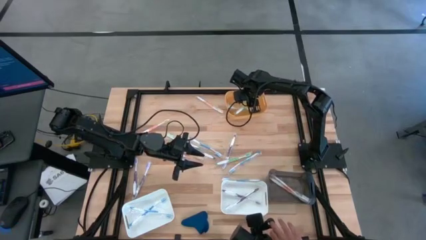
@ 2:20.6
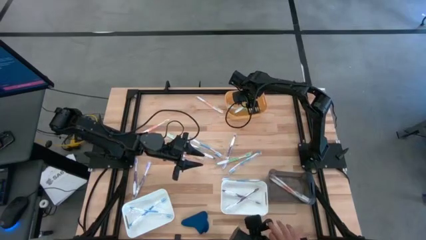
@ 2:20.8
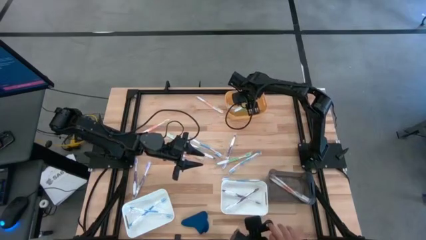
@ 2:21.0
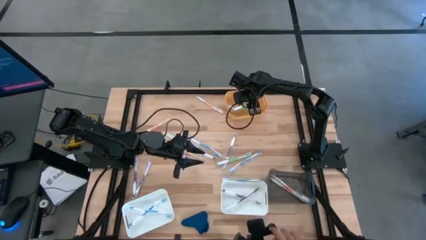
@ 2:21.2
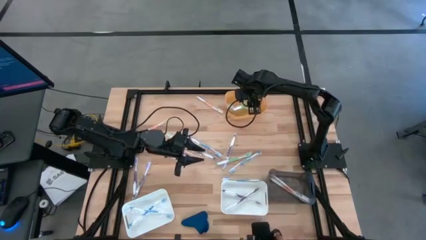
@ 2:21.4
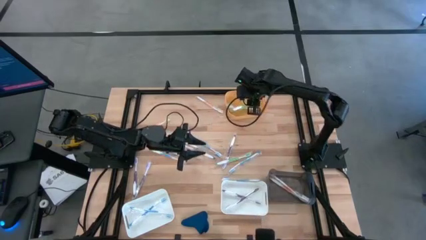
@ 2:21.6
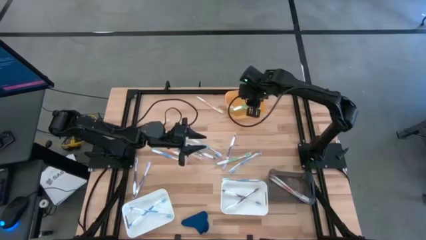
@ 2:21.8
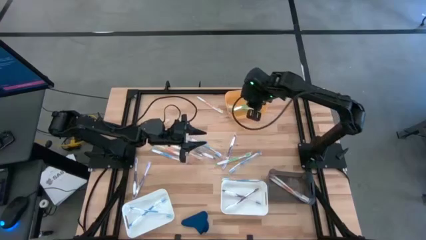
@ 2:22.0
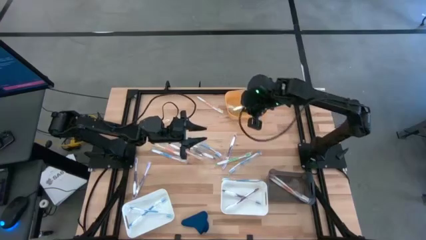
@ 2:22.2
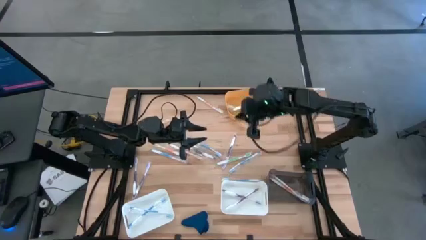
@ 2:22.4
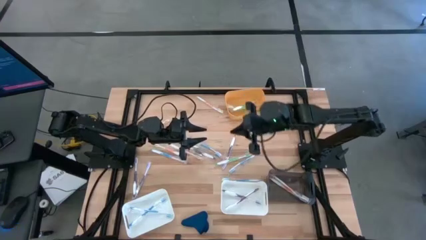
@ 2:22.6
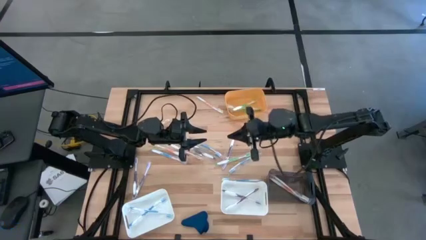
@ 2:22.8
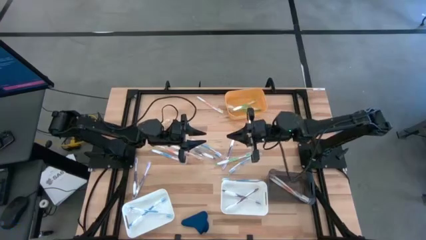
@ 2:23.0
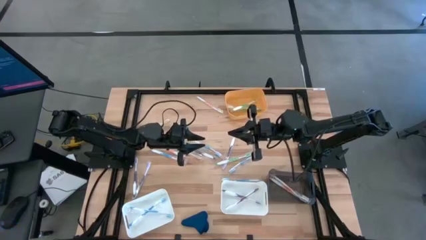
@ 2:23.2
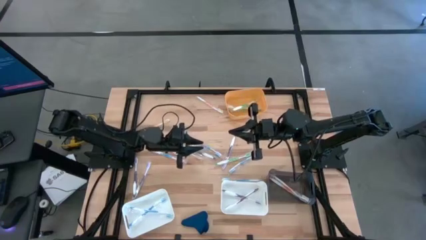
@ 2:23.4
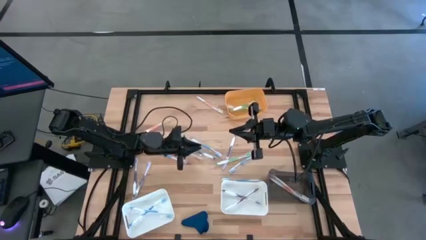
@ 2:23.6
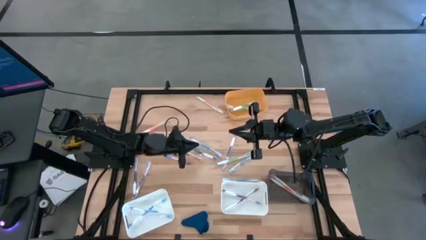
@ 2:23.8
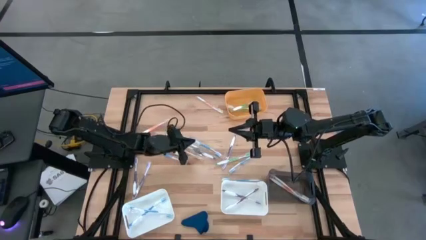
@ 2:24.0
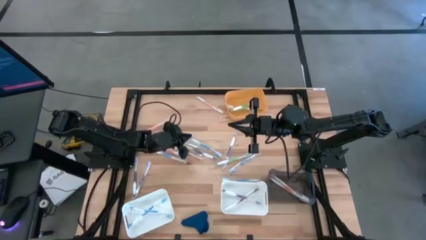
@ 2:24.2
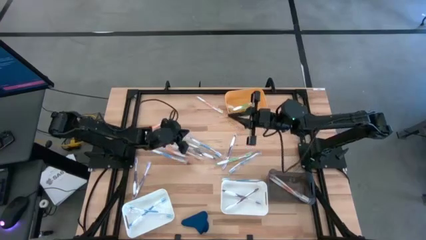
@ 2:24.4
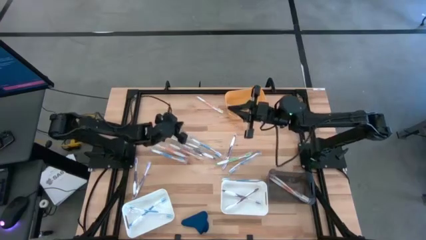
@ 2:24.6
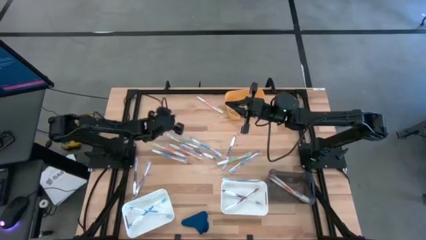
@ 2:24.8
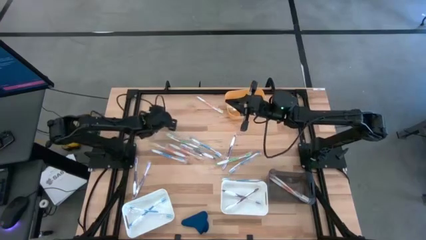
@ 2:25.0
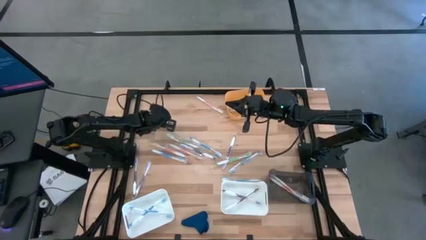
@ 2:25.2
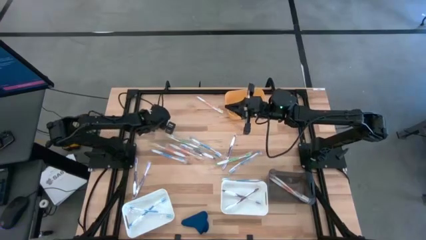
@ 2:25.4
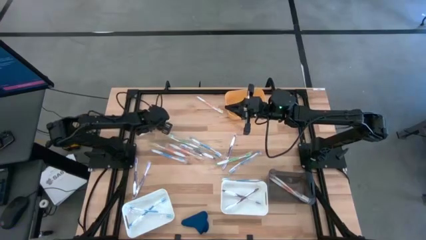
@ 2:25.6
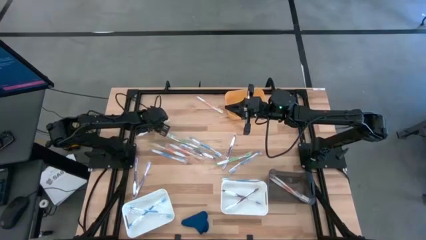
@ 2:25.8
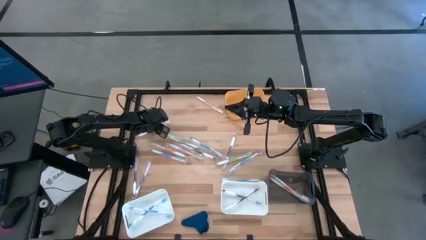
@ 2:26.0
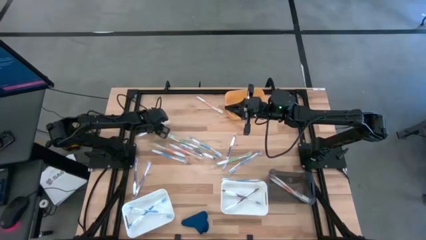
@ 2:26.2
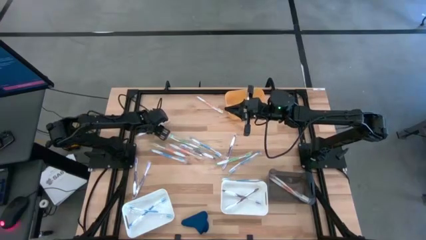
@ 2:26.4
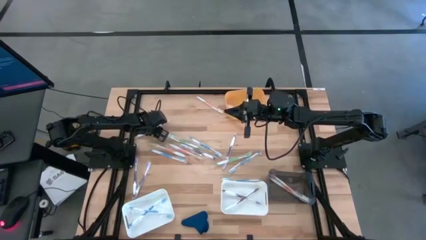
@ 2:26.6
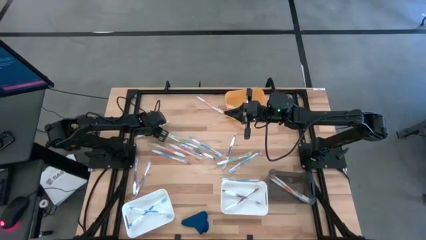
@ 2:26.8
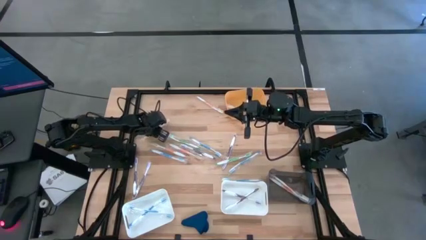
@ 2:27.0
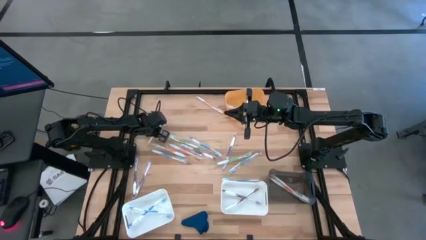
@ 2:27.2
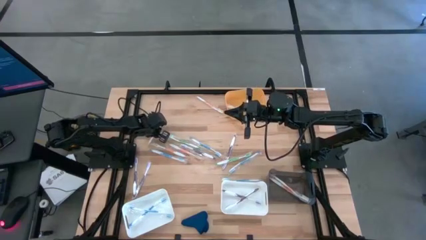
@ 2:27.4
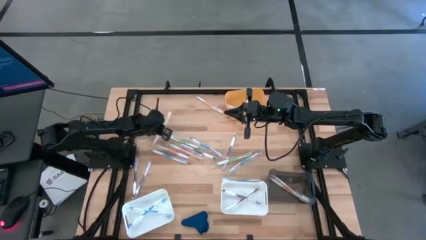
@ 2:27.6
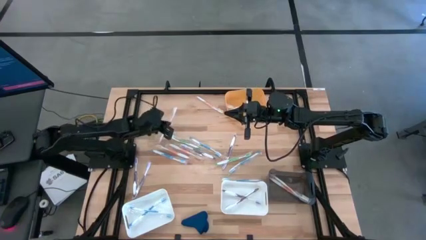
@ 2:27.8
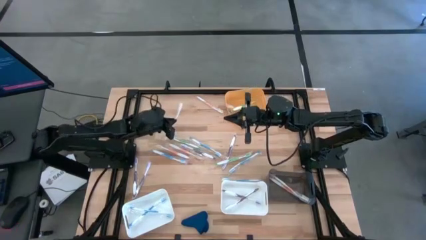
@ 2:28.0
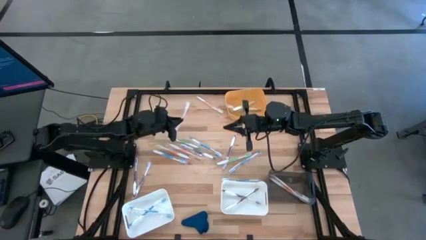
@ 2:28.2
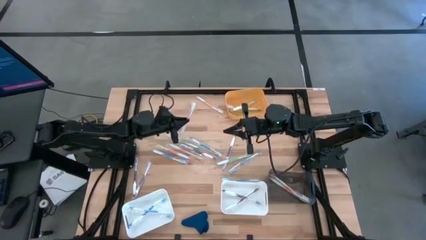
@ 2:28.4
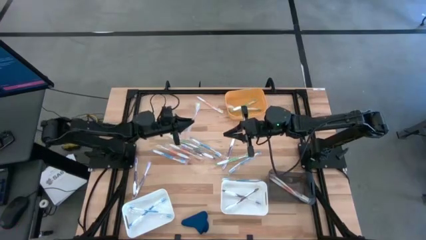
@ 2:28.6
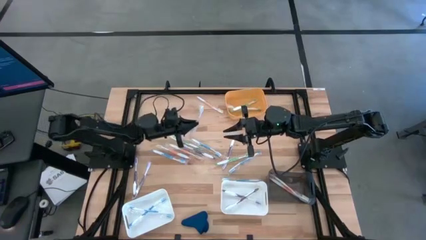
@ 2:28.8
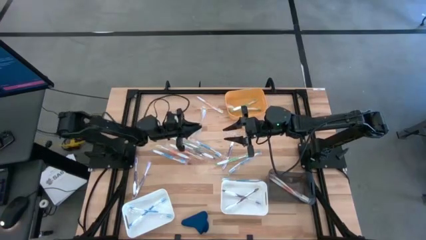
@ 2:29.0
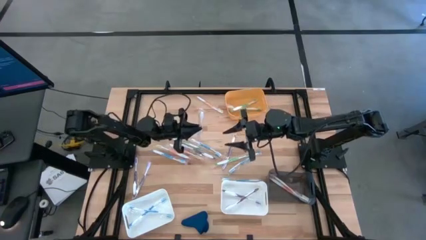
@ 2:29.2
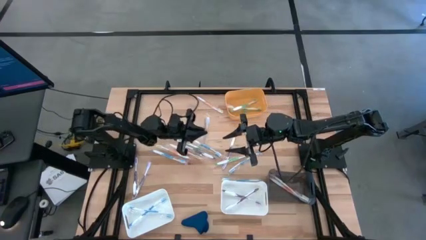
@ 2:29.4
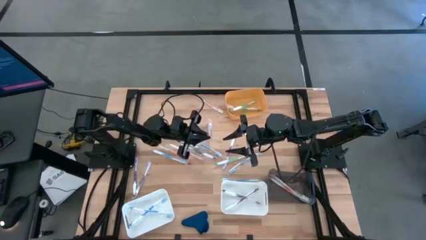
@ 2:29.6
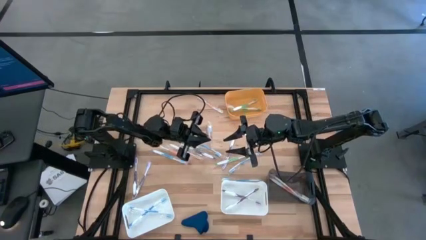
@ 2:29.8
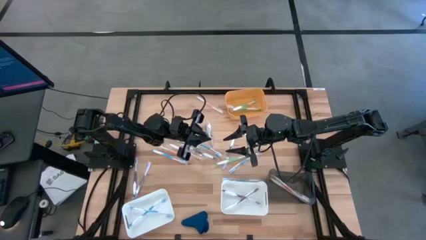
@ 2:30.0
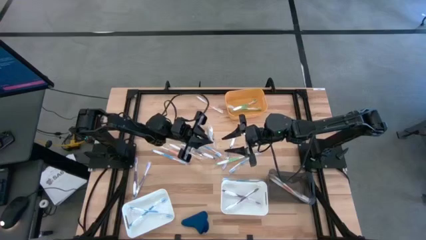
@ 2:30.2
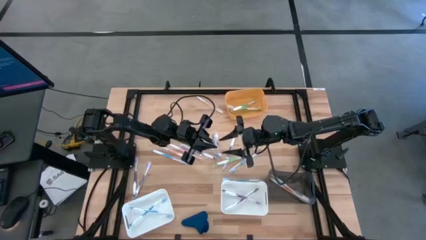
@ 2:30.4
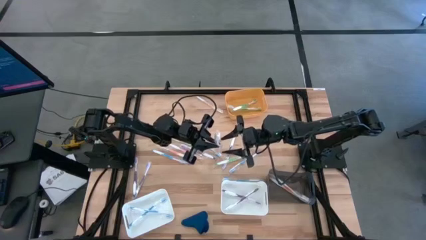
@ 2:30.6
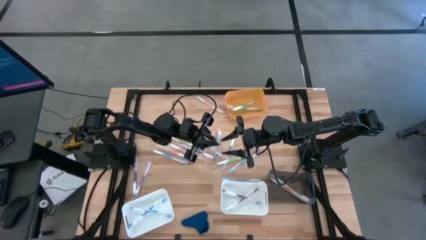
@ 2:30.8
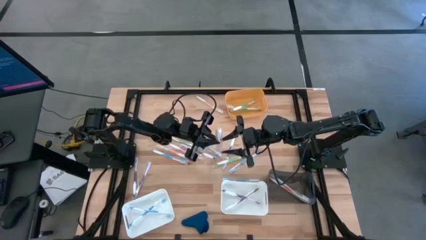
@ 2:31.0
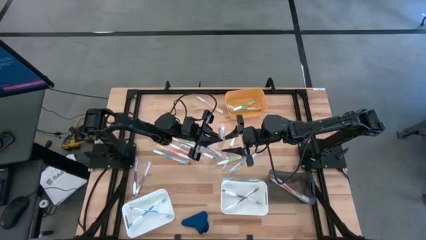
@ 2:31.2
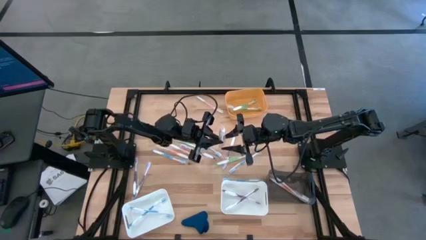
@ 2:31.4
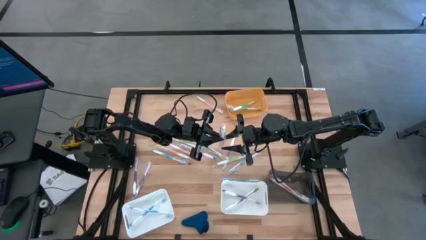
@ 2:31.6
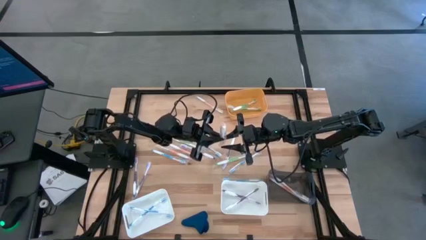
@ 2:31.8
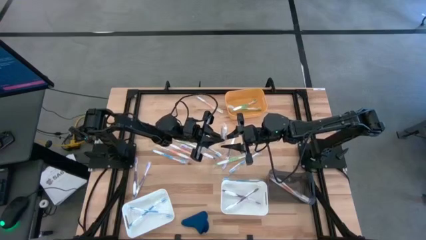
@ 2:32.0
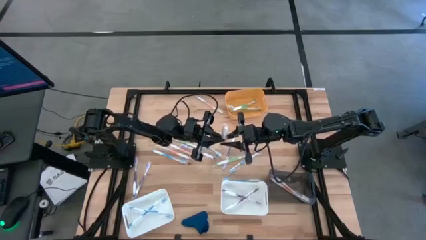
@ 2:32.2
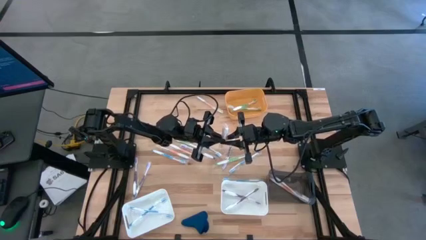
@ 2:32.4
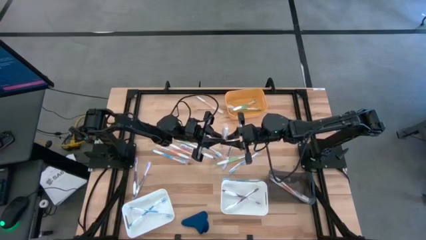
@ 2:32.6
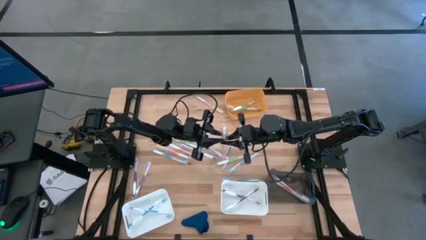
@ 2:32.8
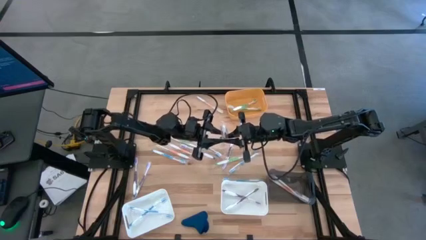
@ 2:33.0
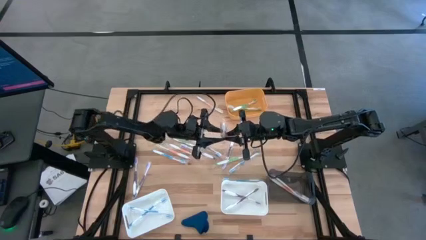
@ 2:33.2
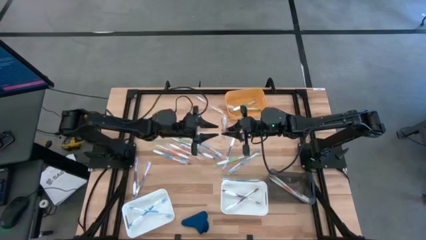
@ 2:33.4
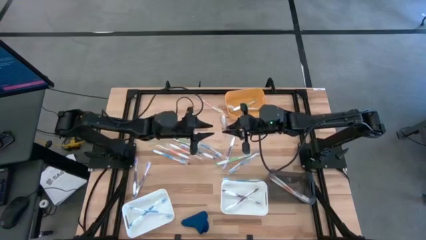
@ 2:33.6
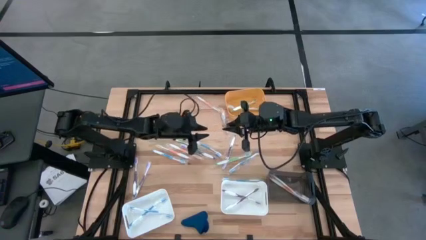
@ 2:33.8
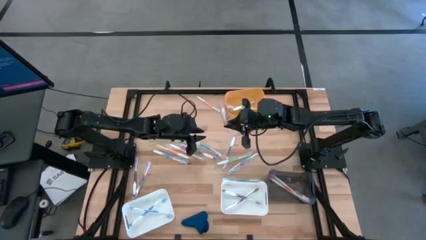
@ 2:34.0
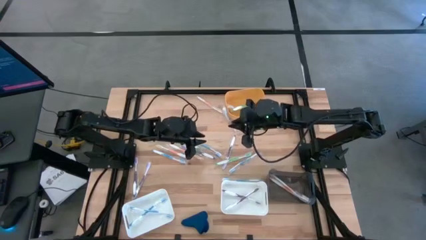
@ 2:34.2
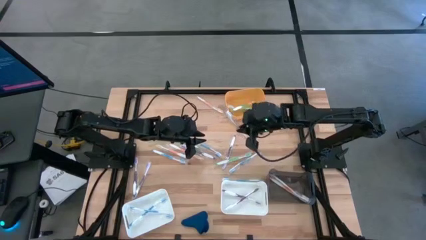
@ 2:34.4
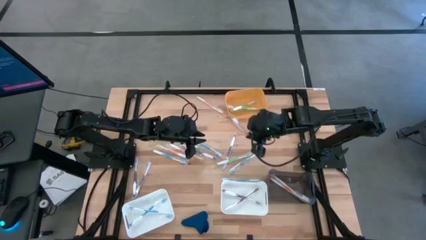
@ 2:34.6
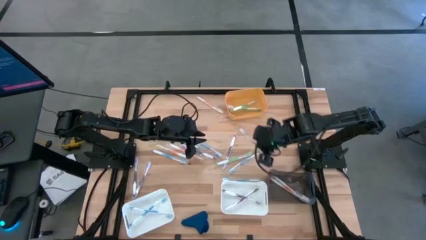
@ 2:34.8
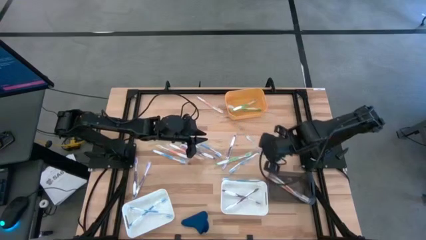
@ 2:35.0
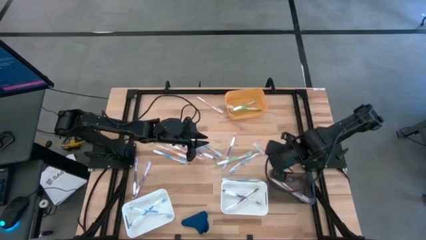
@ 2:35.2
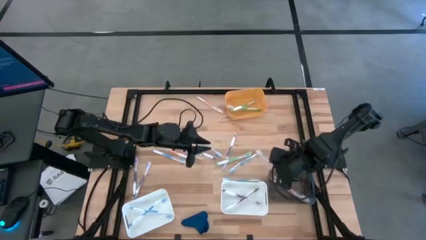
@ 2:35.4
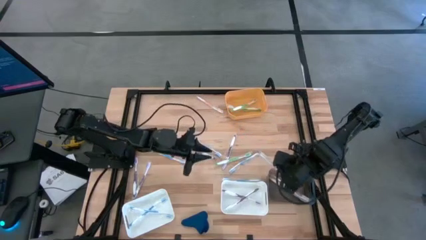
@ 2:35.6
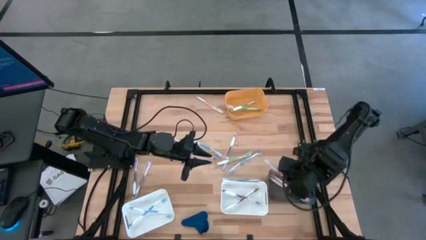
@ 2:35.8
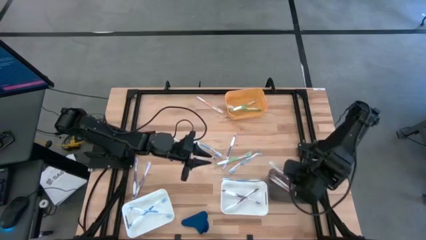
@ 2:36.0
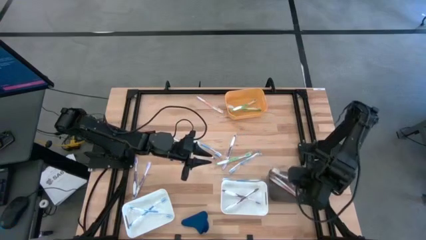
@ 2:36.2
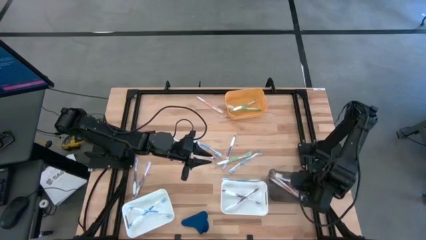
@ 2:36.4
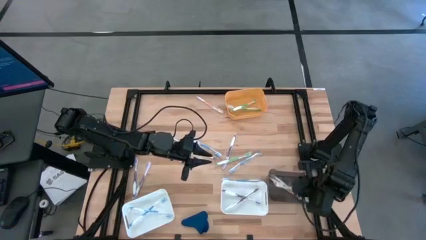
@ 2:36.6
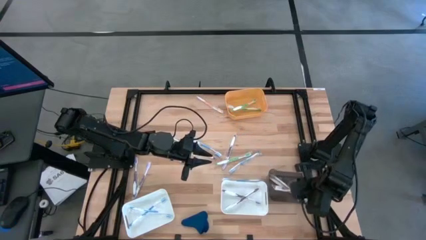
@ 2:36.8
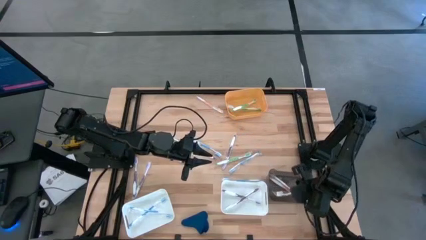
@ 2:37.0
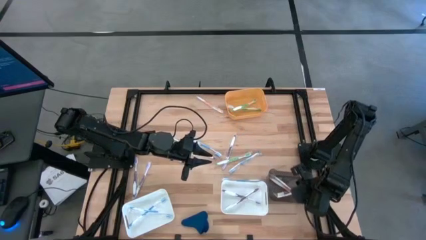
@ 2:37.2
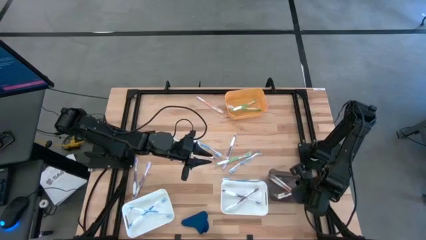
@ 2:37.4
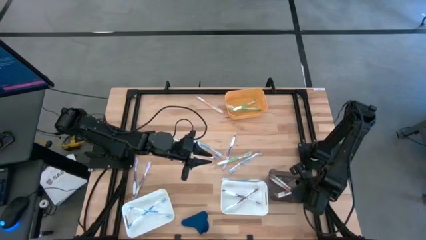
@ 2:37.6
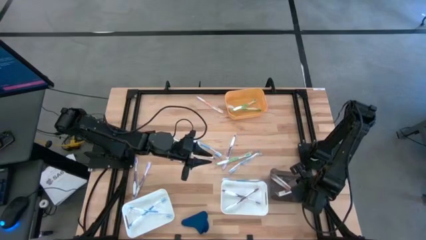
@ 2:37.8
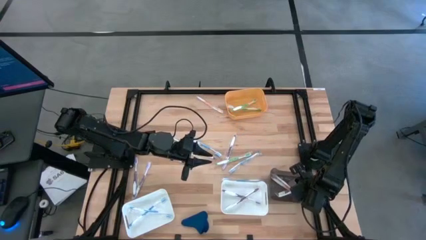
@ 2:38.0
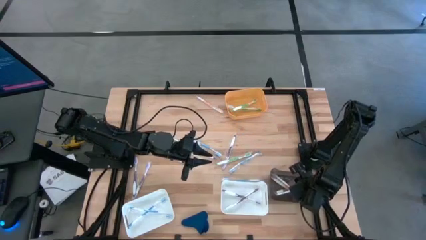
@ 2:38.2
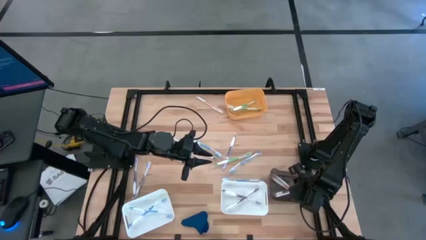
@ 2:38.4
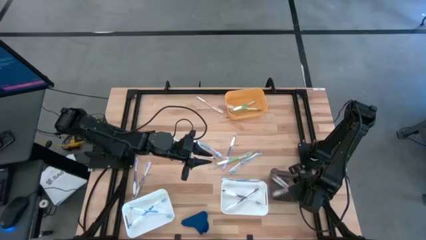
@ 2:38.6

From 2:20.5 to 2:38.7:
Task: Pick & Place Toothbrushes
Put the orange toothbrush into the black bin
